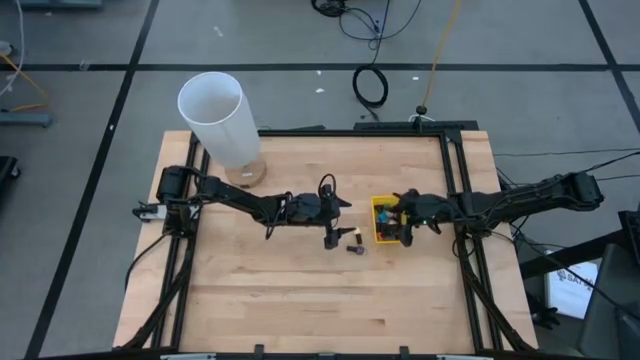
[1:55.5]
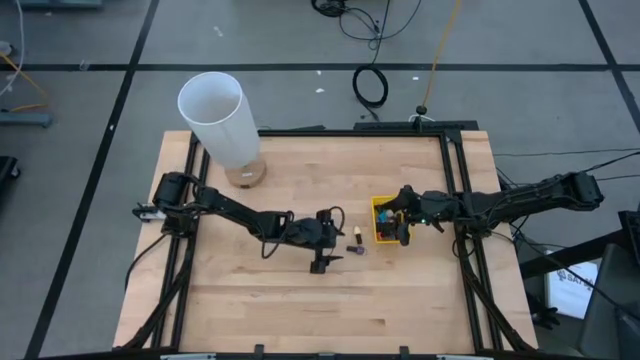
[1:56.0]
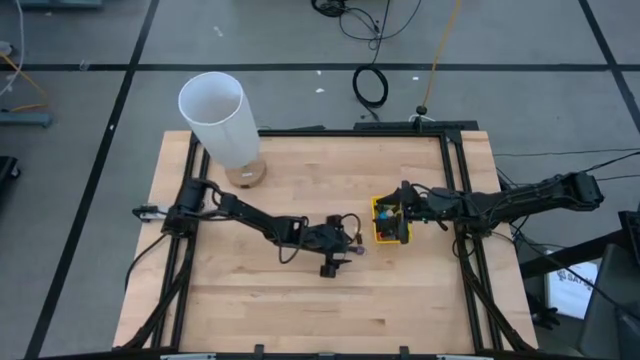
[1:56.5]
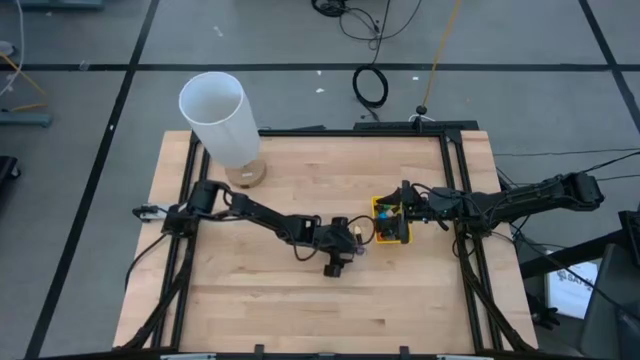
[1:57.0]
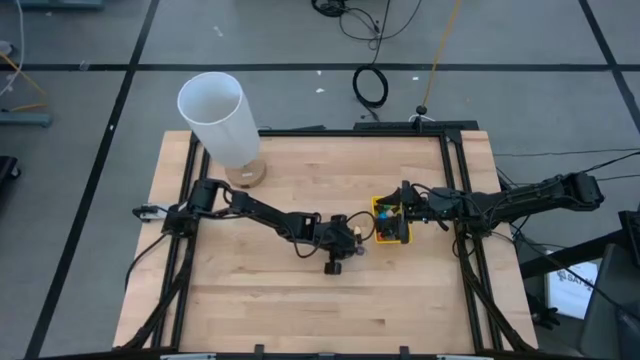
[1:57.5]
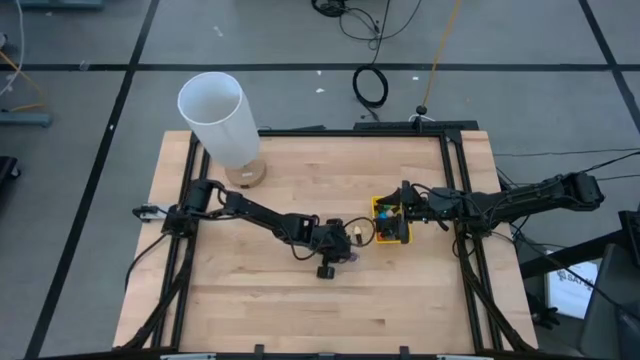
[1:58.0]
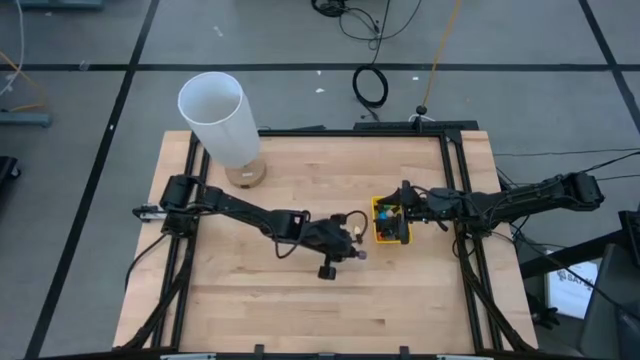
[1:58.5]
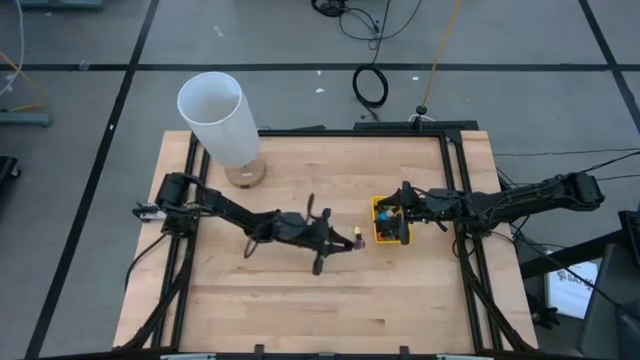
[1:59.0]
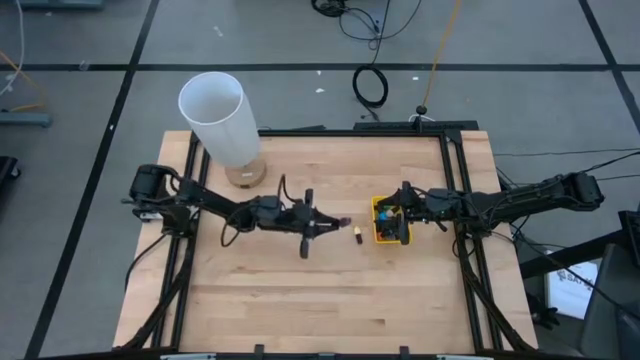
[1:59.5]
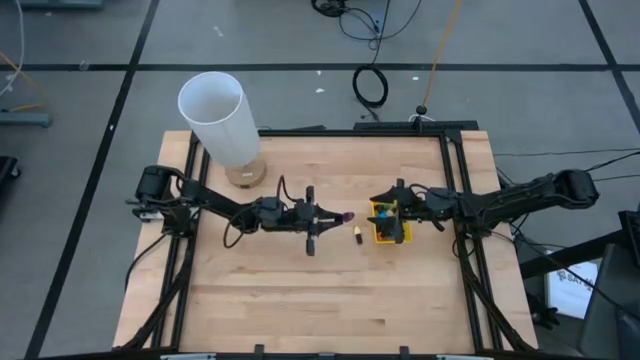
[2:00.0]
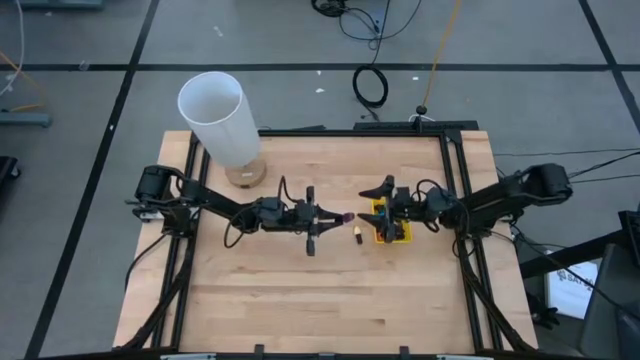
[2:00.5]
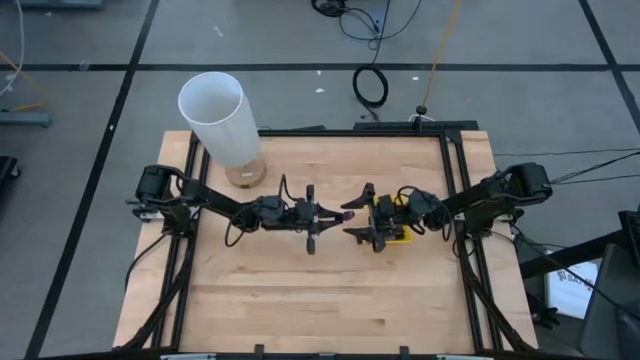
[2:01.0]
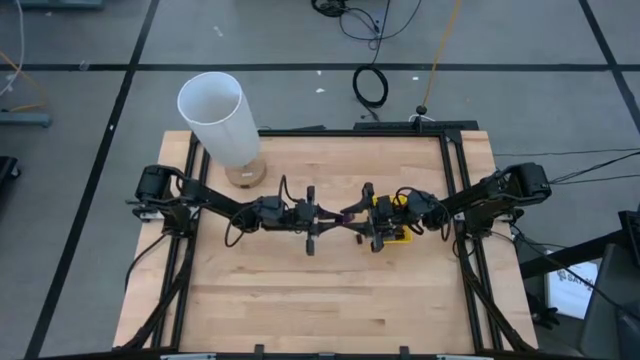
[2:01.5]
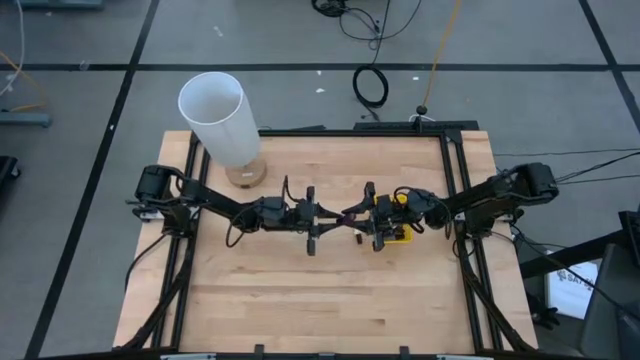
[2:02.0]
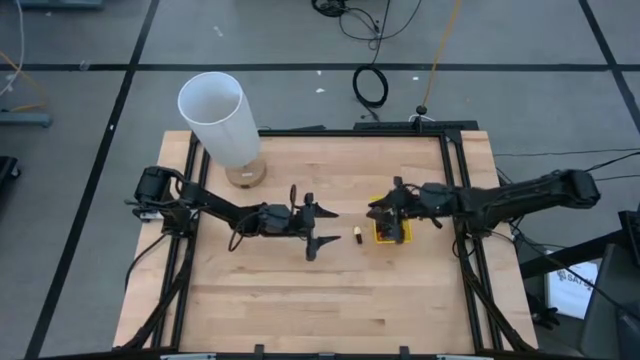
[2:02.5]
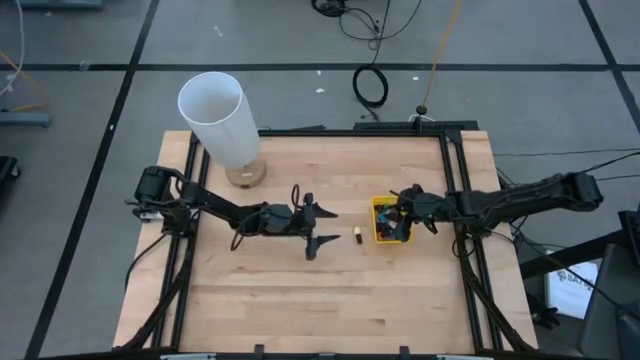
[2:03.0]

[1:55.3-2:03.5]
Task: Pick & Place Nail Polish
Put the dark violet nail polish into the yellow bin

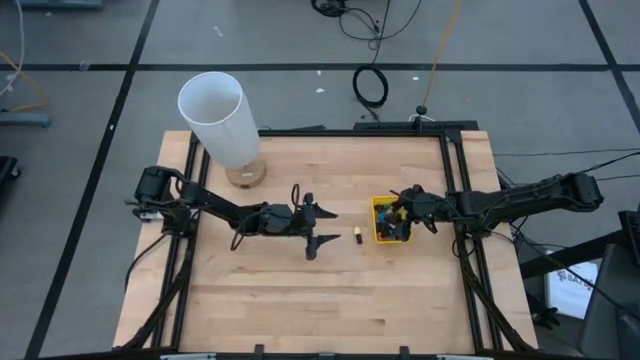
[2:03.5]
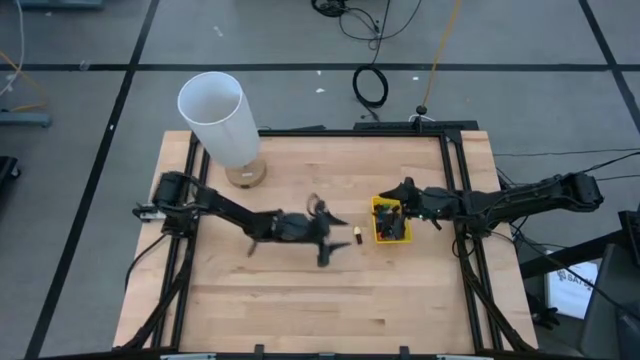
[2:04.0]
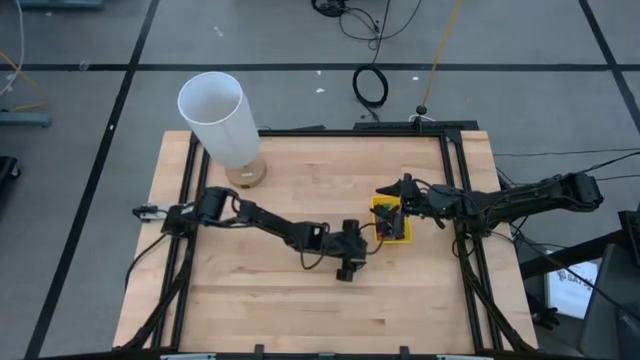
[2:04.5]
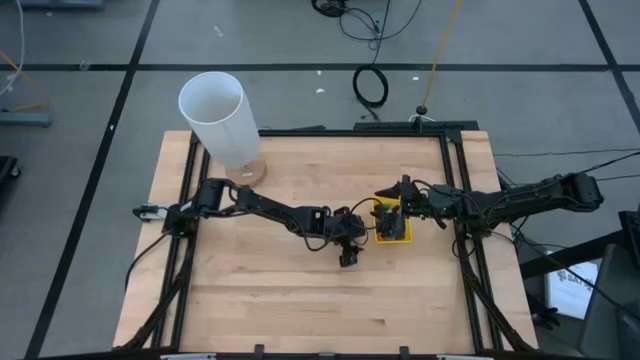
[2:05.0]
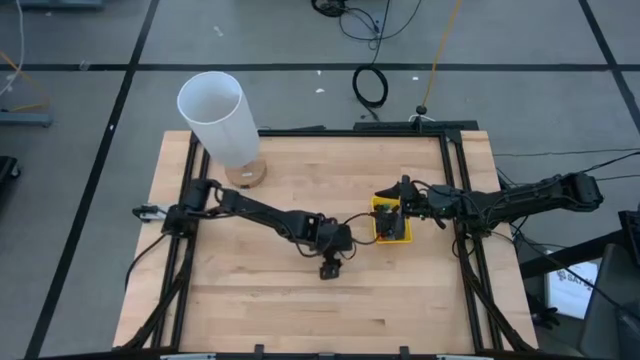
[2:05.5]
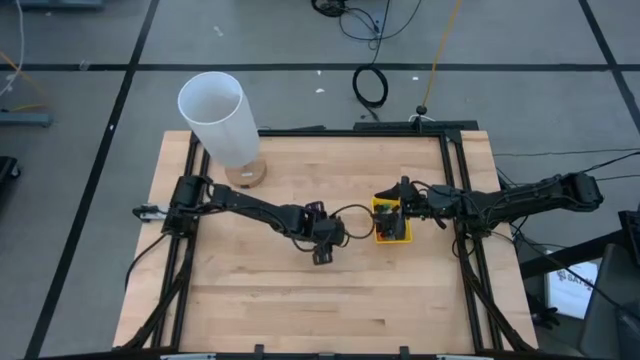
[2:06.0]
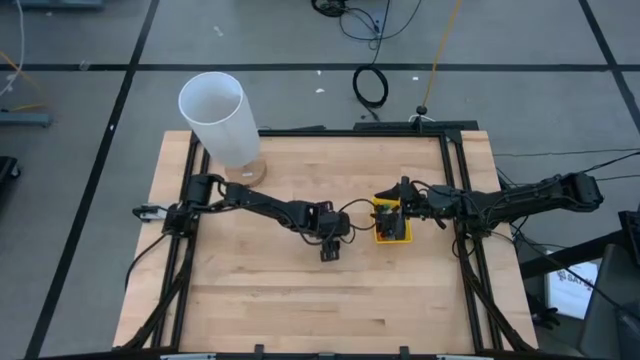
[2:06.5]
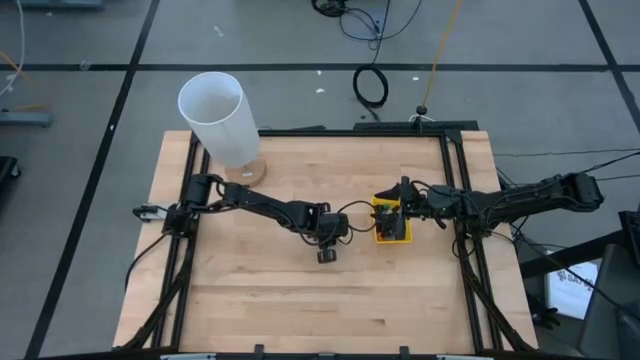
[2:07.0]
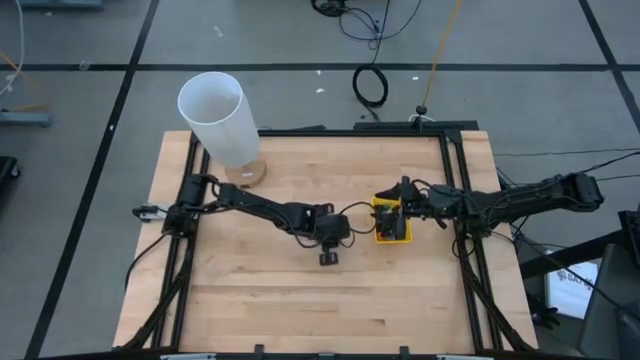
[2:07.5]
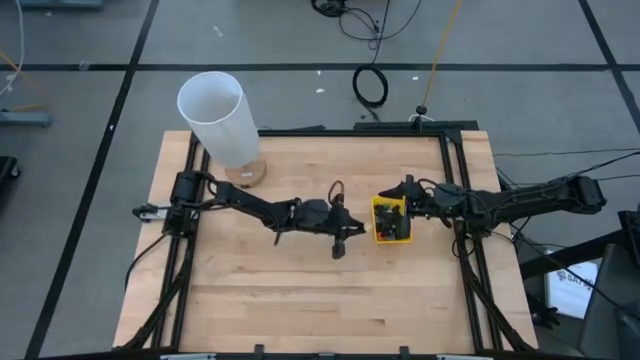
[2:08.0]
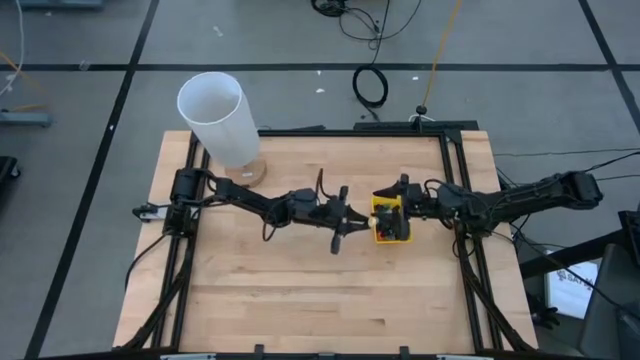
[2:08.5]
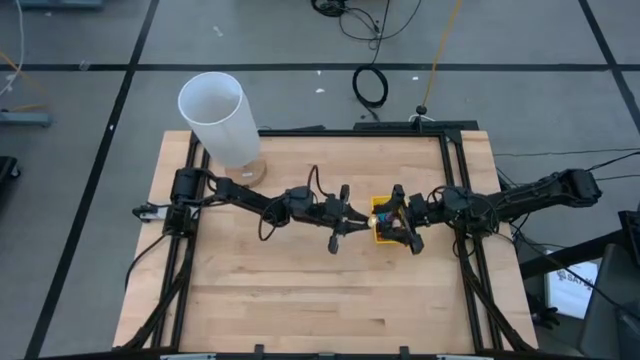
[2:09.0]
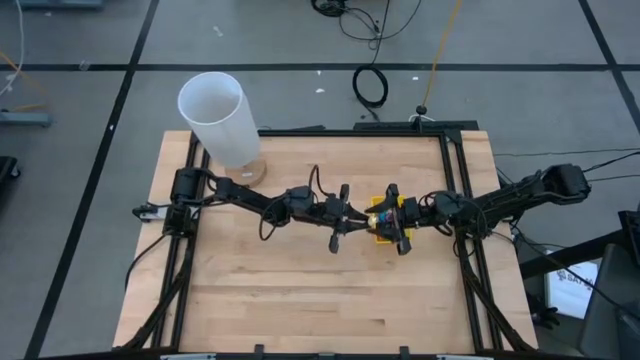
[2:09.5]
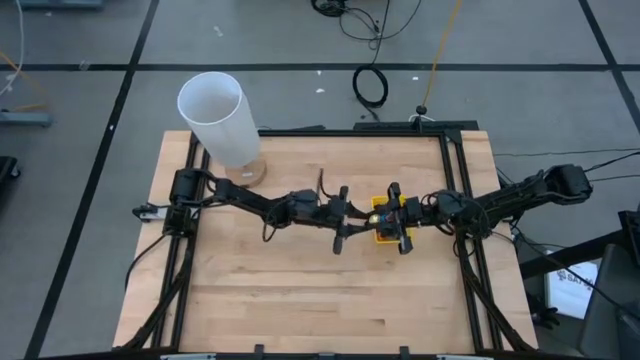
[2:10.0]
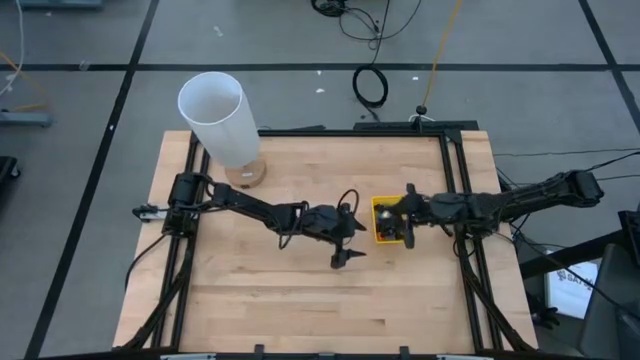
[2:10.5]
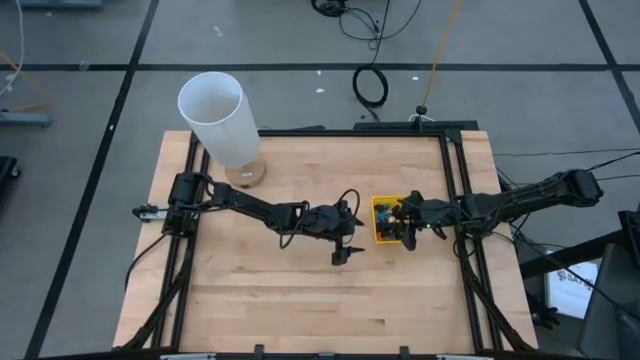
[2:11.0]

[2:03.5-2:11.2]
Put the yellow nail polish into the yellow bin

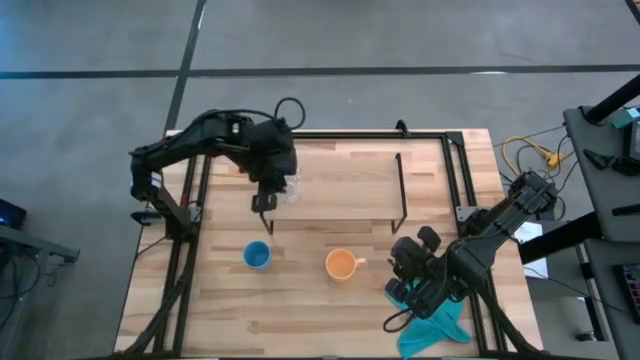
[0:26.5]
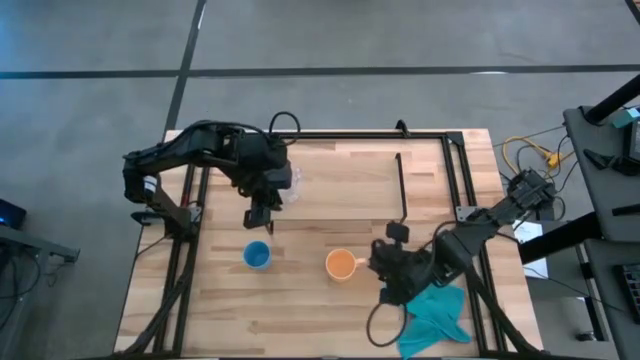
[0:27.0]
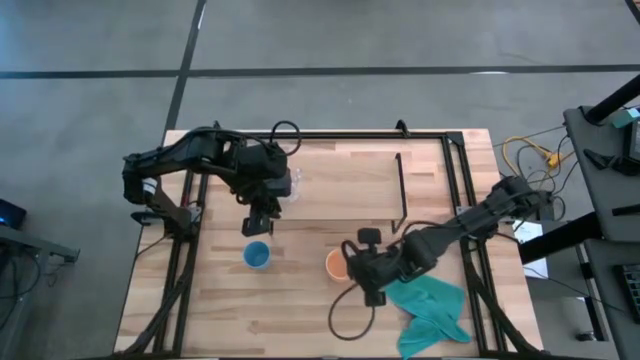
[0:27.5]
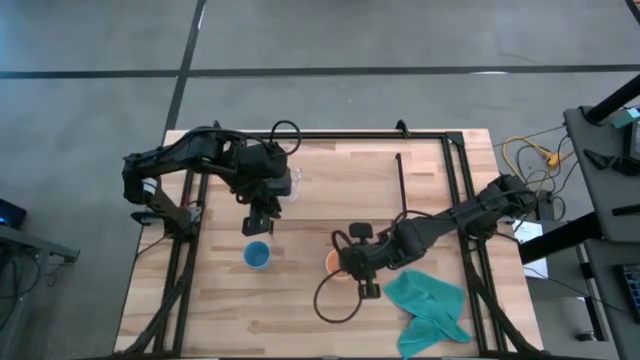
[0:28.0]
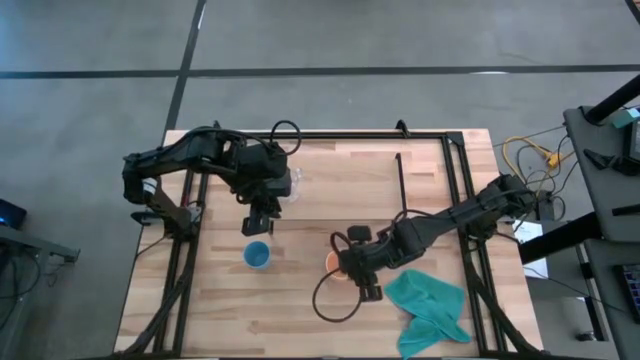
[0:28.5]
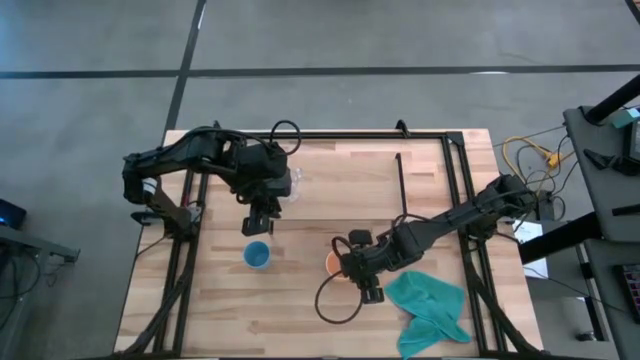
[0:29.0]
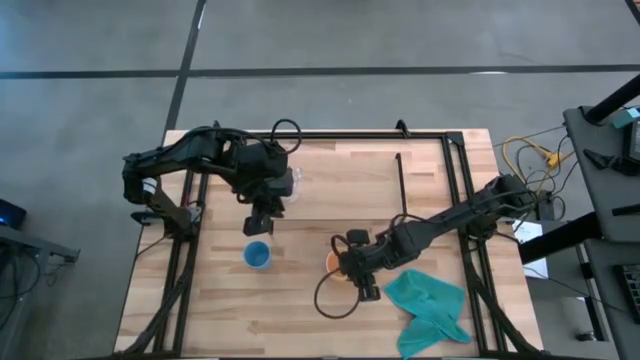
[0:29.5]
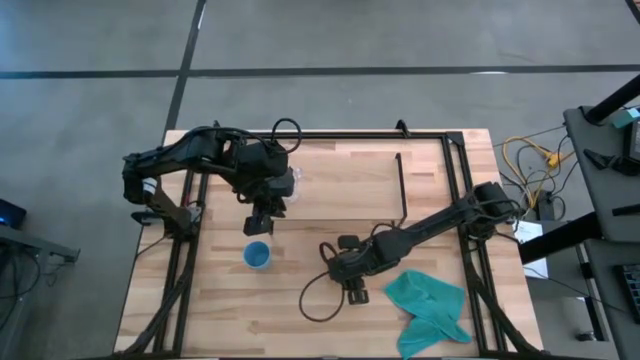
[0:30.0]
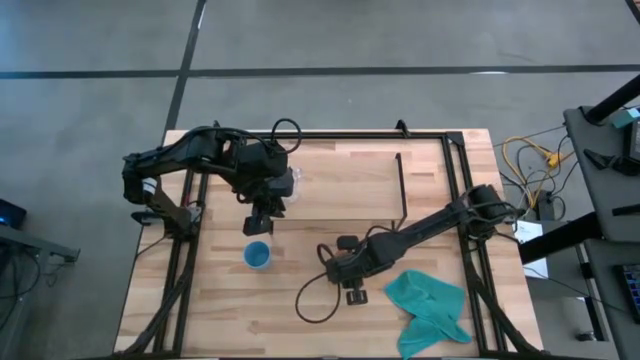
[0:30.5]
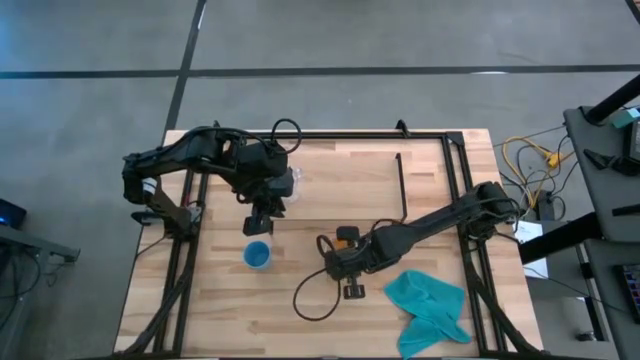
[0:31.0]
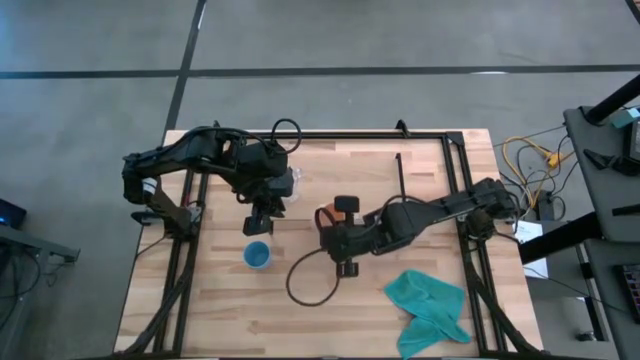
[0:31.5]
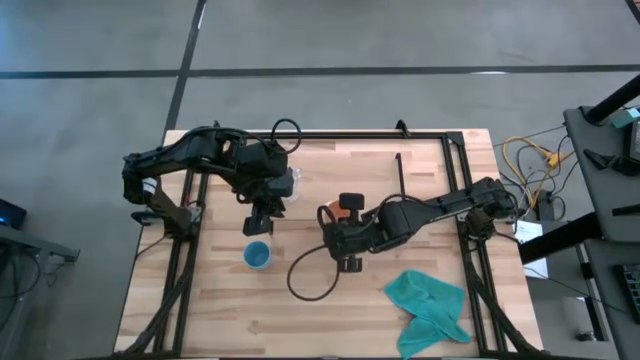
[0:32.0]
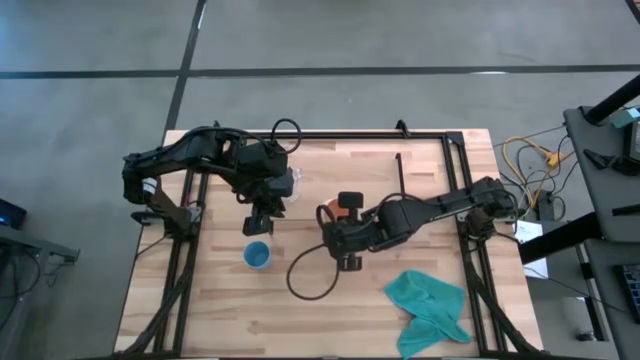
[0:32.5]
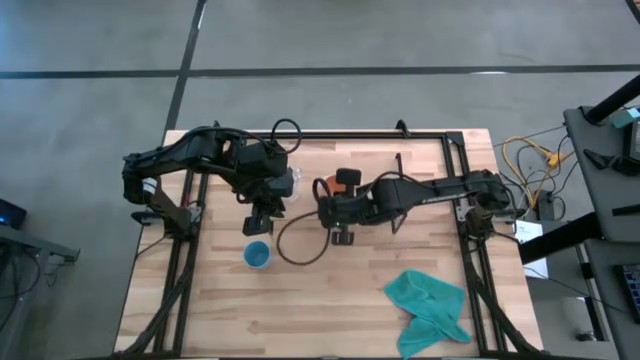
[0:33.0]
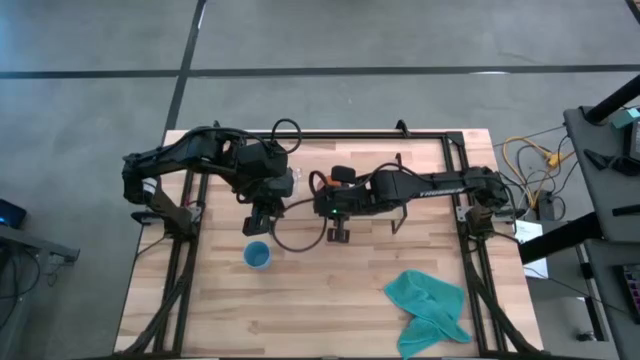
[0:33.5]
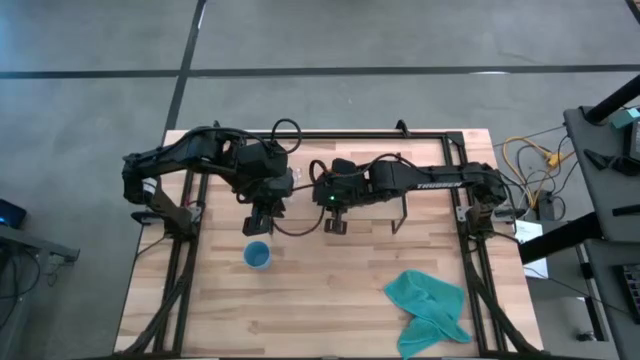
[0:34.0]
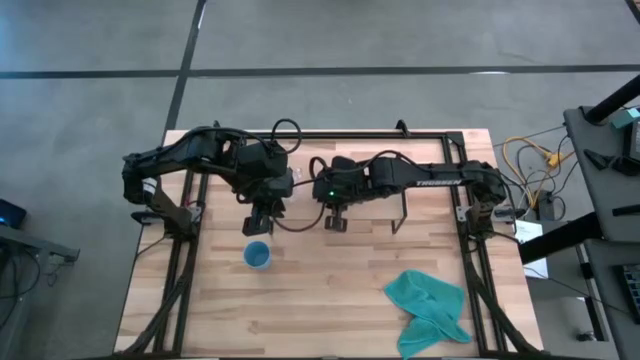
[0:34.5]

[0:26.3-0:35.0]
Task: Stack small to large cups/mugs on shelf
Put the yellow mug on the shelf
